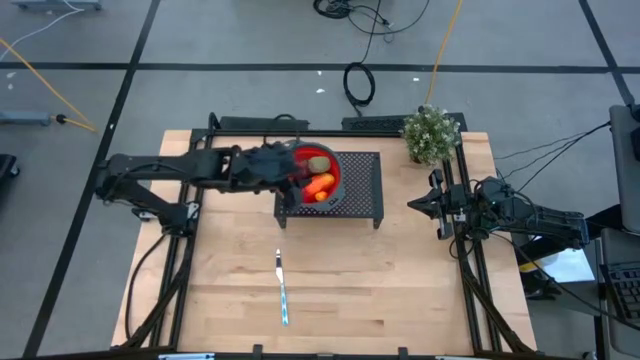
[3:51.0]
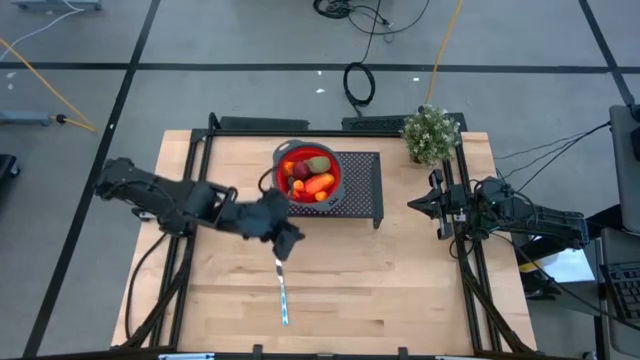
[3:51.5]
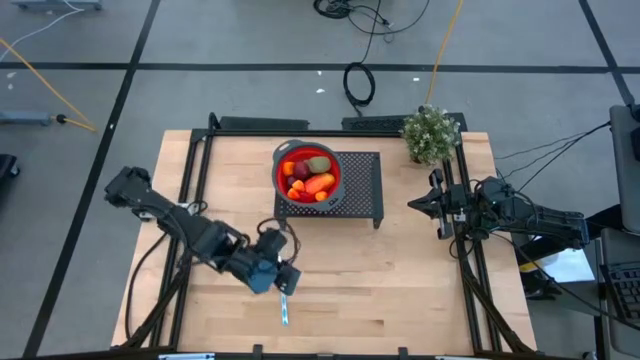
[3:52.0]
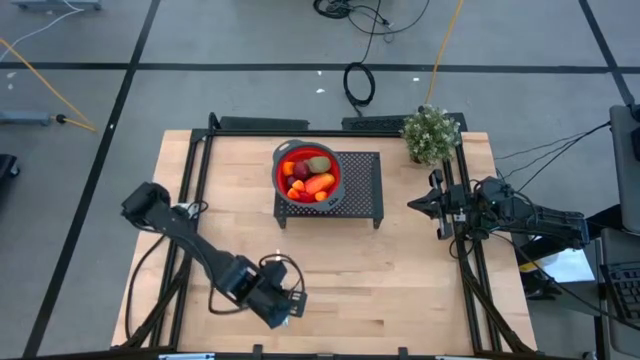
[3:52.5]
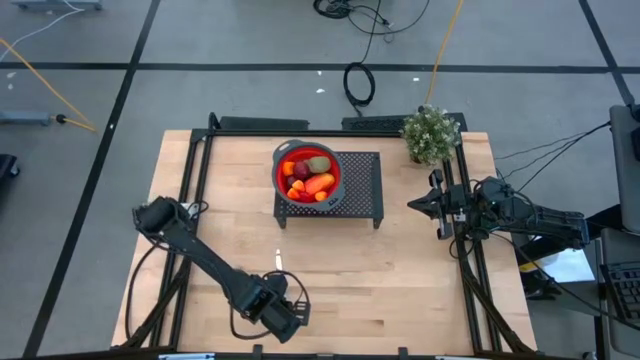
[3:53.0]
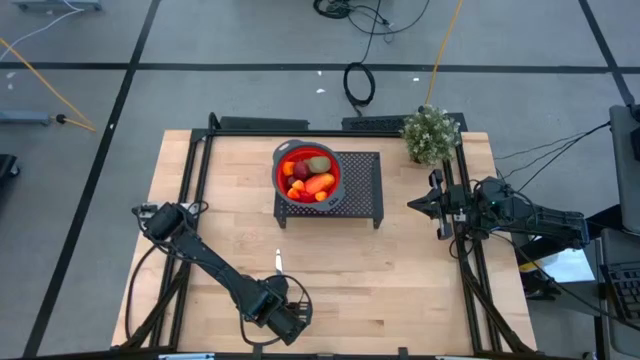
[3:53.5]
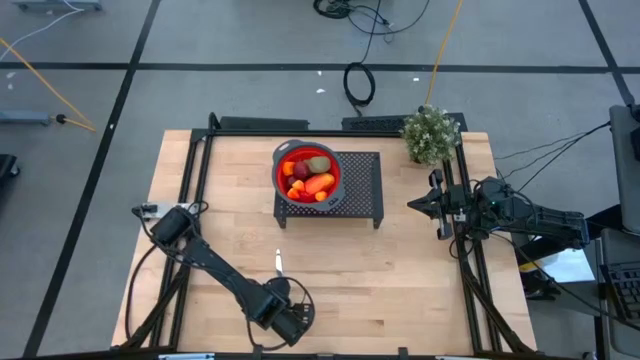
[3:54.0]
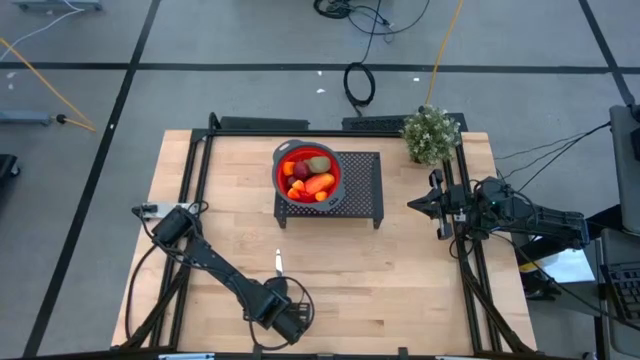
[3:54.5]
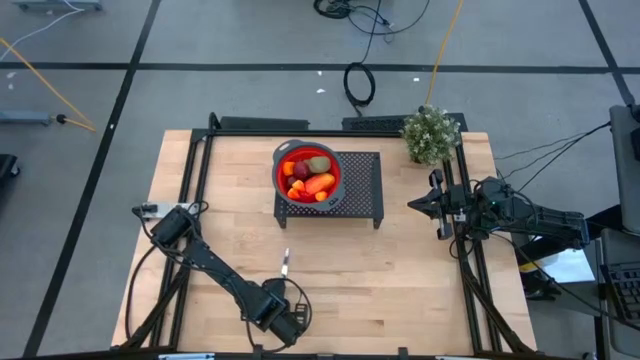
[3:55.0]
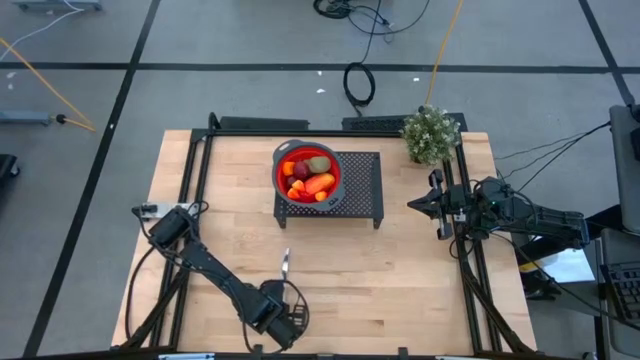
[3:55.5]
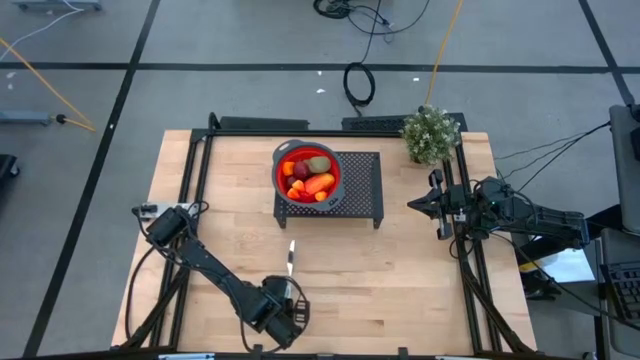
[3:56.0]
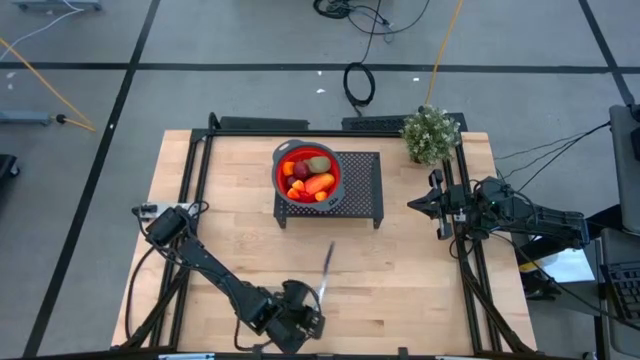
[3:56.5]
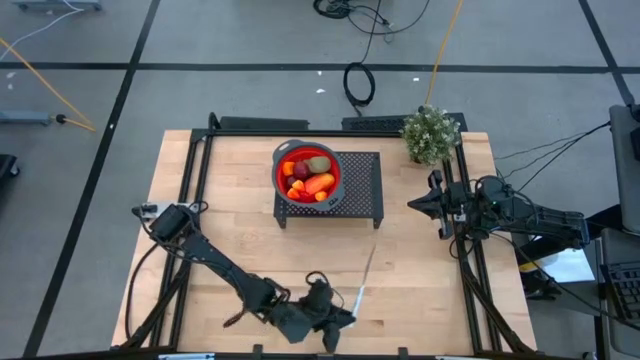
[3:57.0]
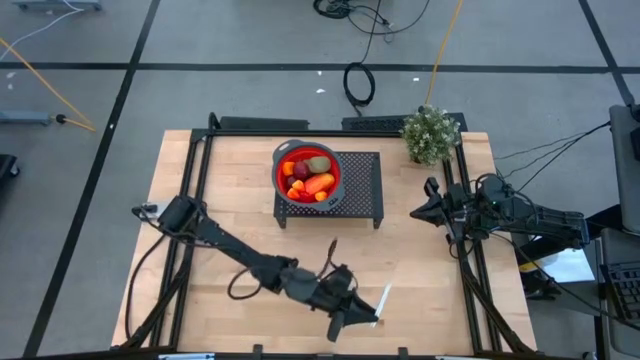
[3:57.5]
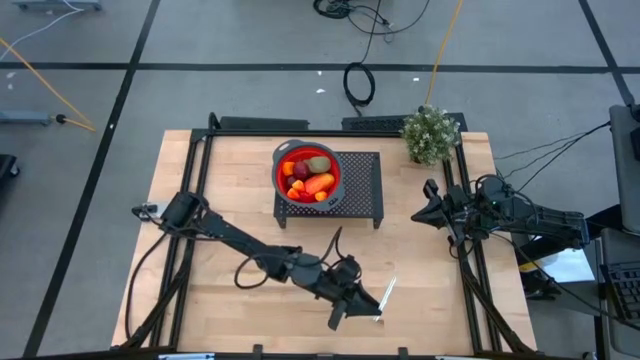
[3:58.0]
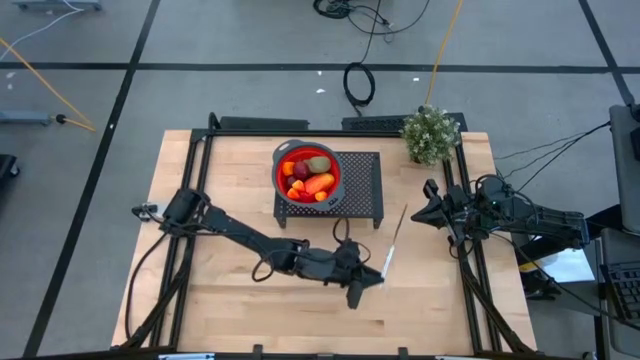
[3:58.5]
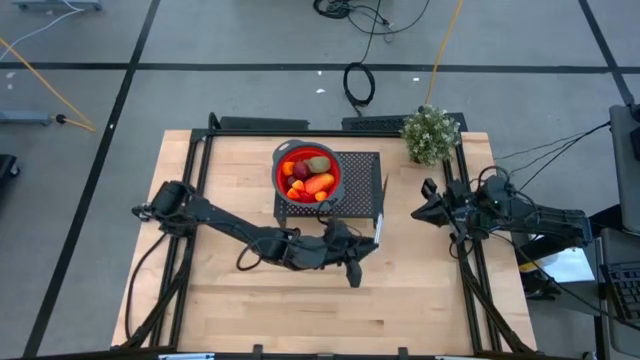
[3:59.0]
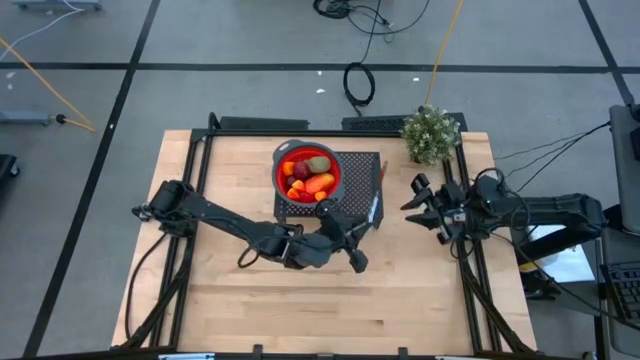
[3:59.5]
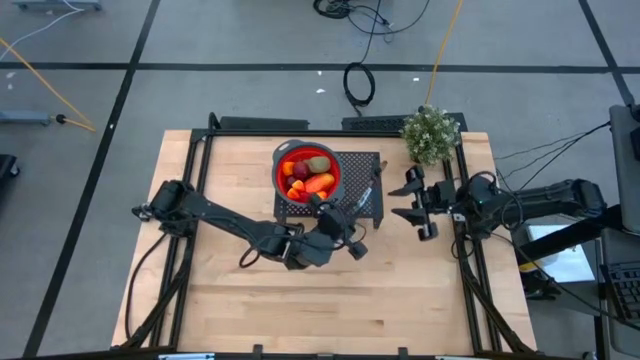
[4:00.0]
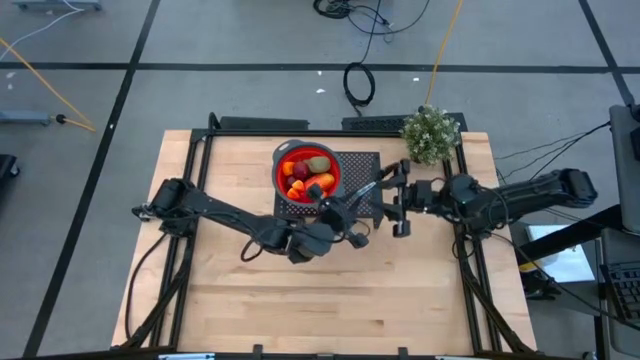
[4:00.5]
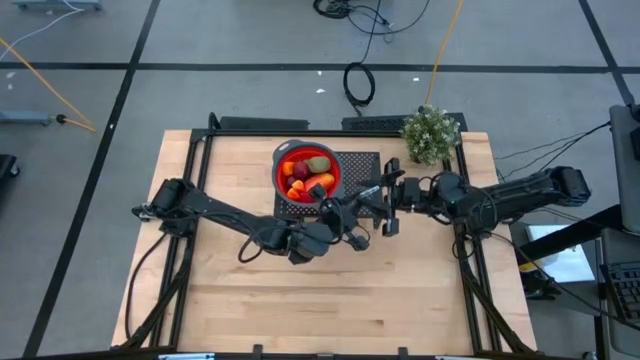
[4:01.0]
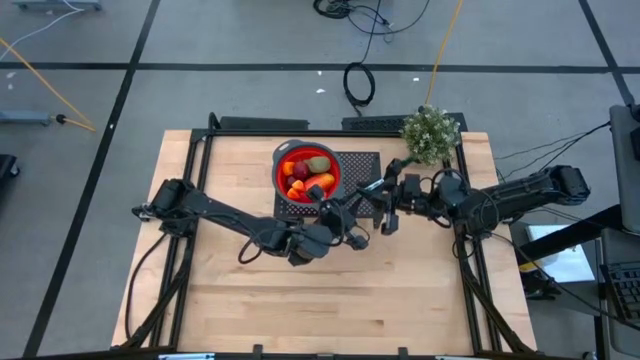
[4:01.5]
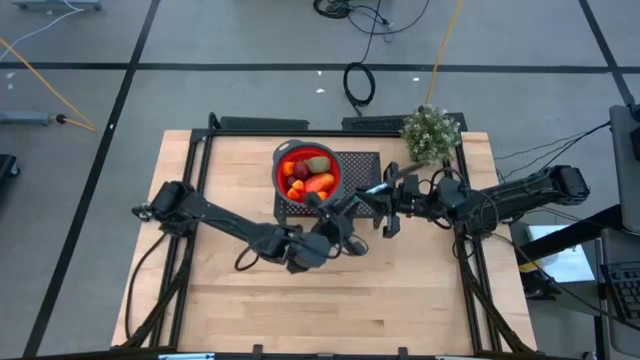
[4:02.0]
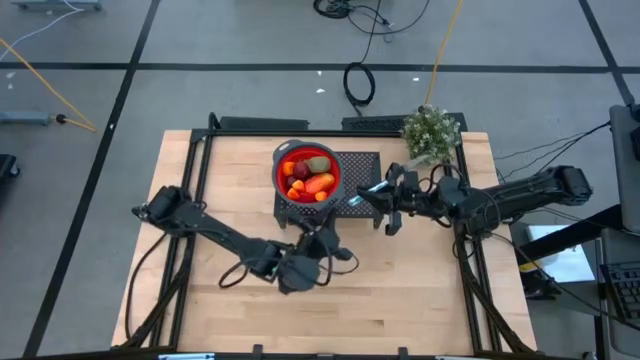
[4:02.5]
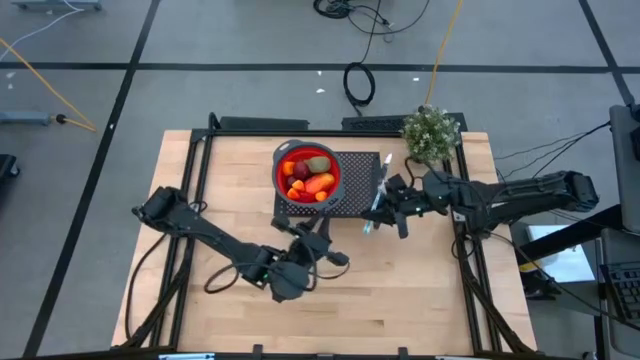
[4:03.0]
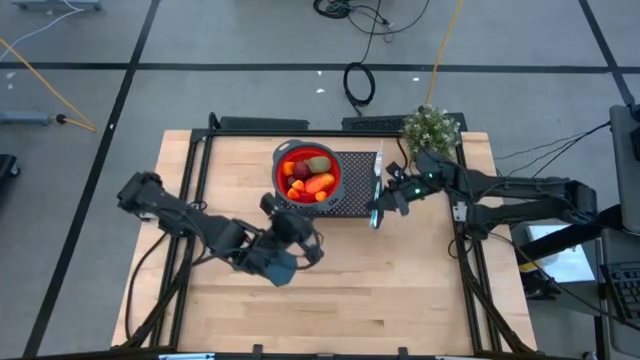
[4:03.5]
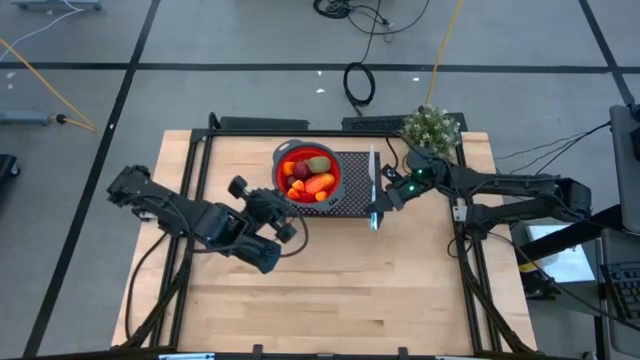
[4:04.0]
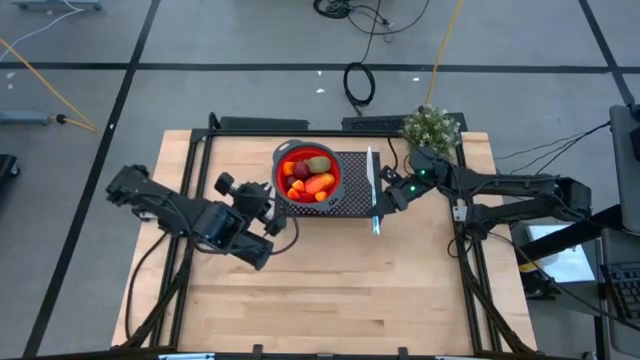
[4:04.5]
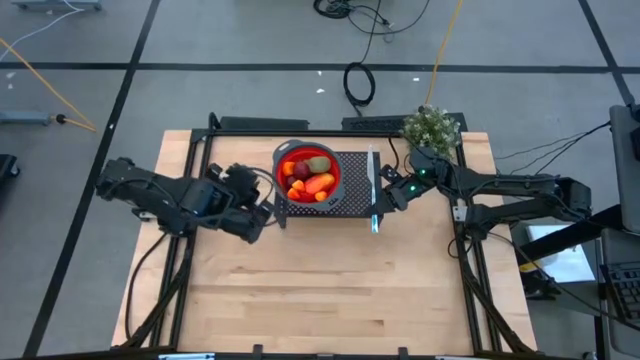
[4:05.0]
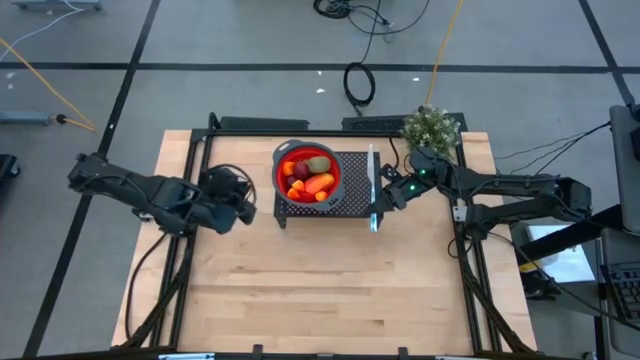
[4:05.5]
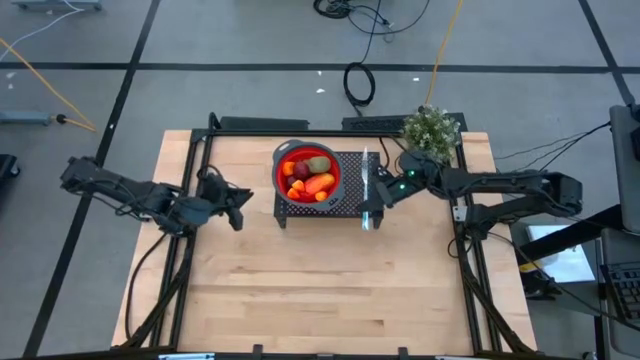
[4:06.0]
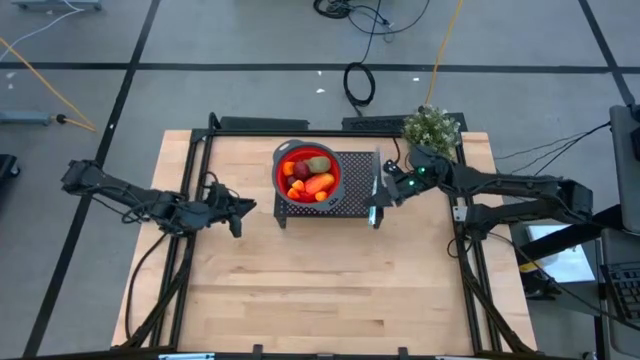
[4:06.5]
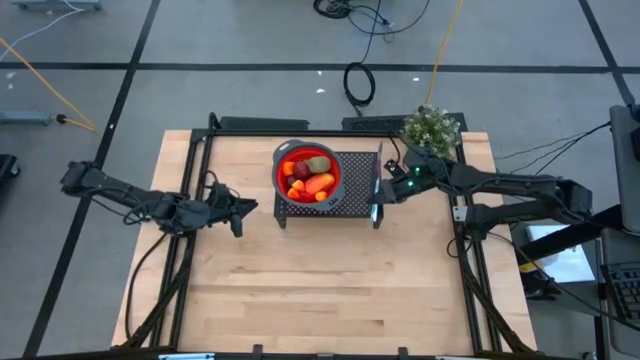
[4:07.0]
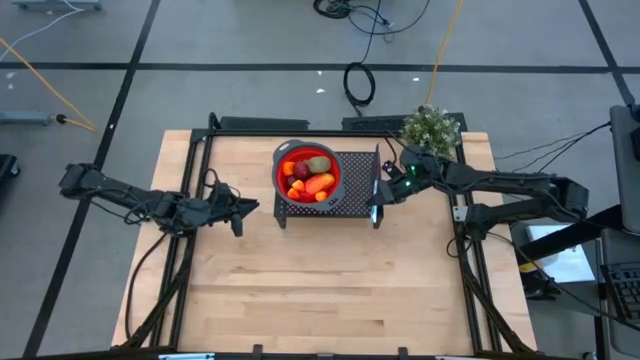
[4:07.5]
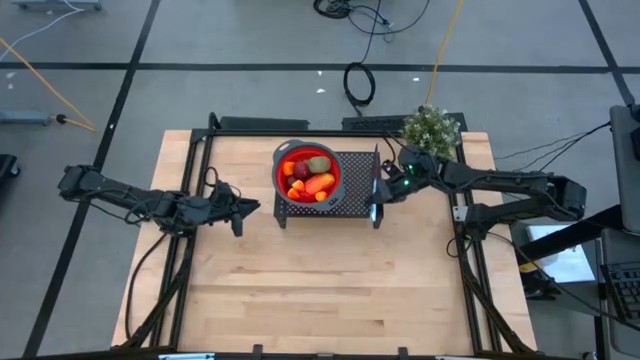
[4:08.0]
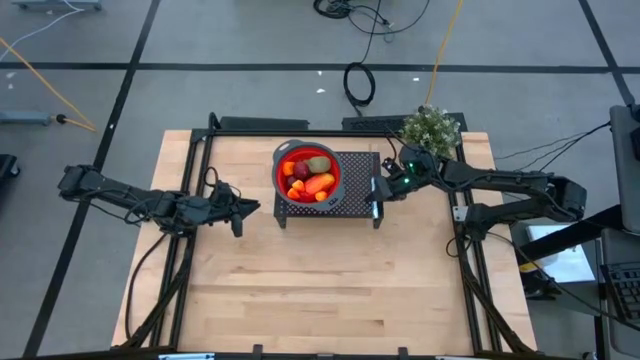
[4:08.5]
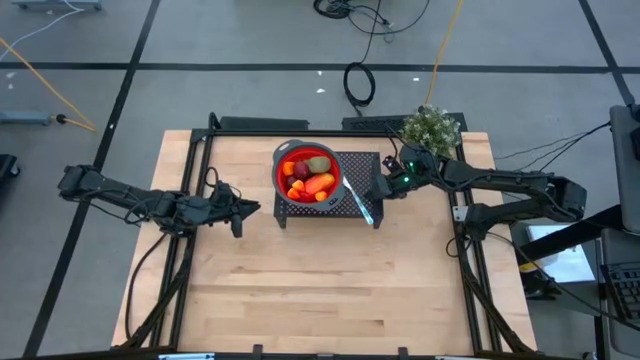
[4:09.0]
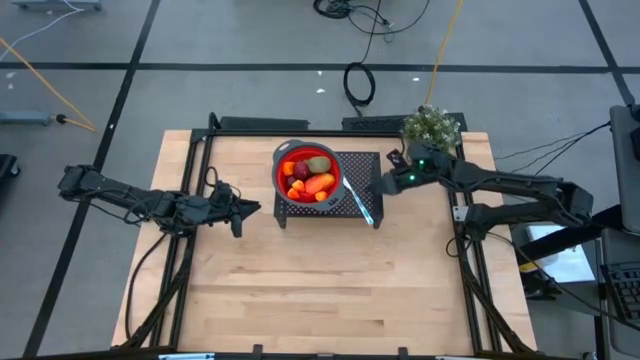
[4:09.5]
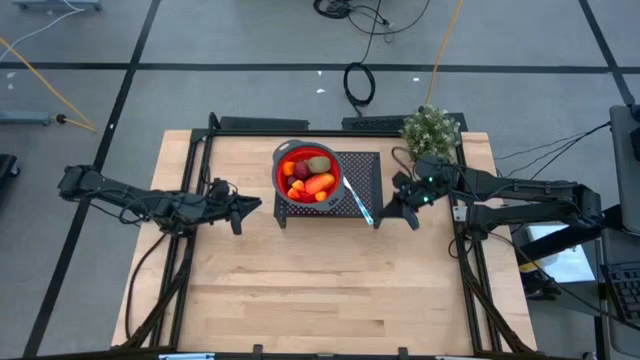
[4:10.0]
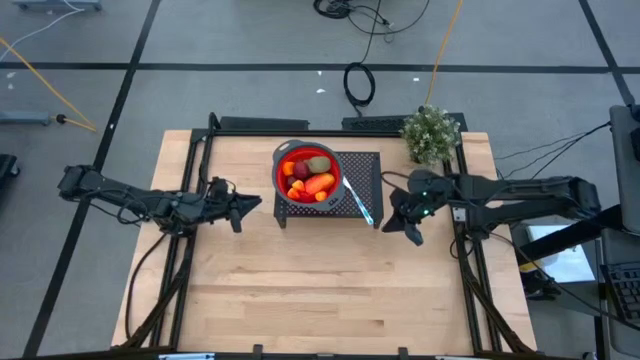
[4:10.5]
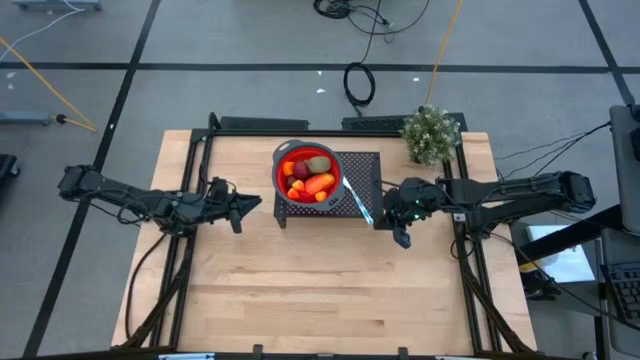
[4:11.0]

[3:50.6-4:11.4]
Task: Pick & Place Fruit
Put the knife on the shelf
